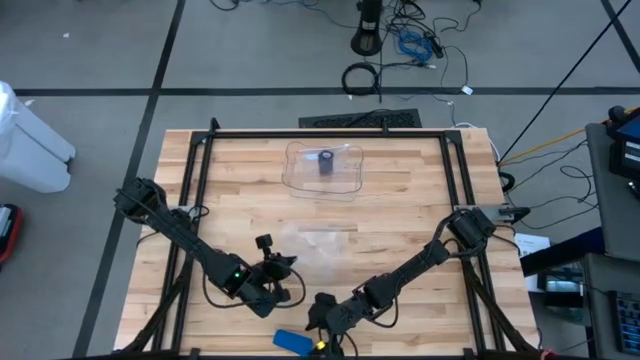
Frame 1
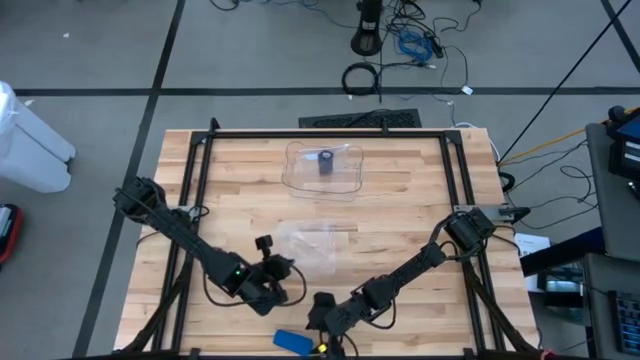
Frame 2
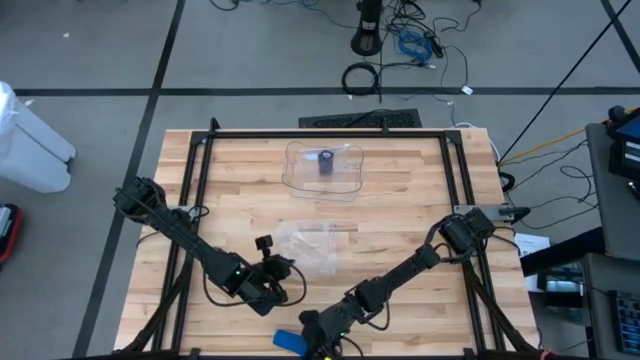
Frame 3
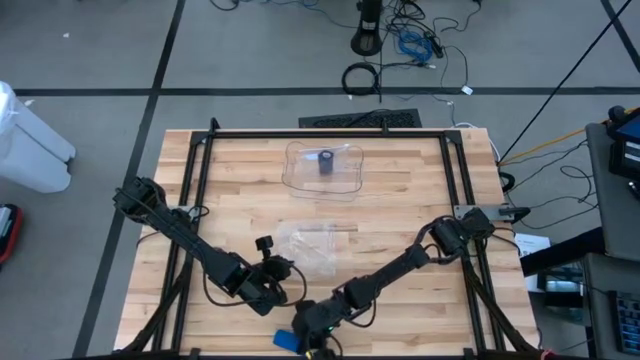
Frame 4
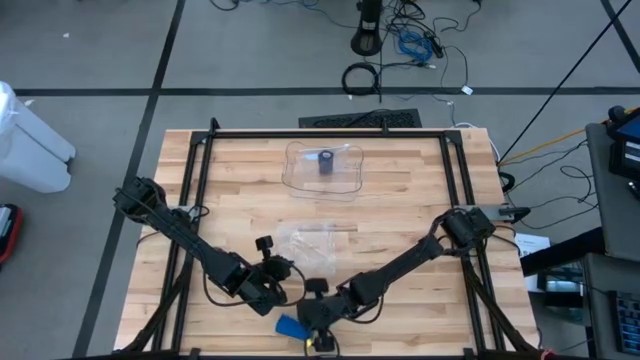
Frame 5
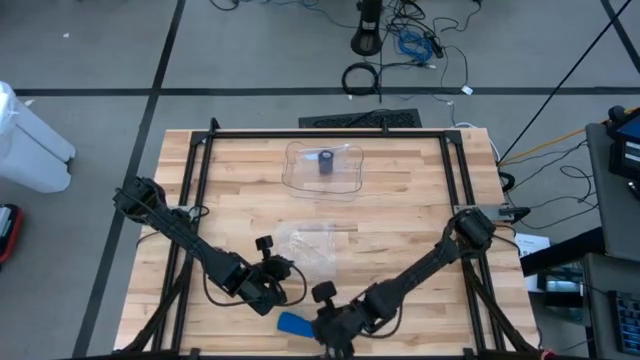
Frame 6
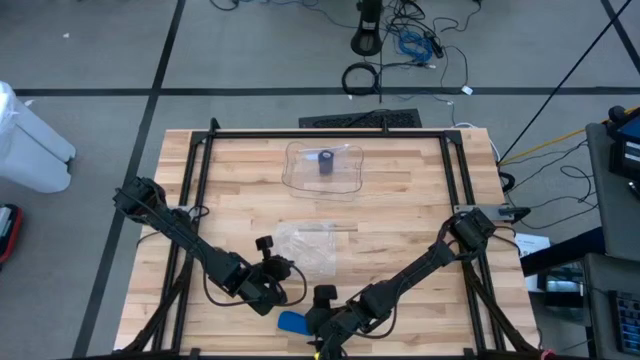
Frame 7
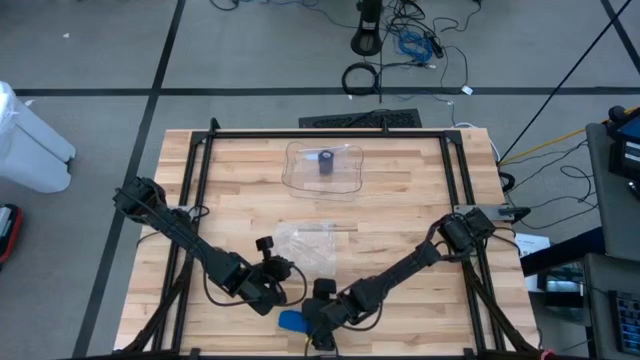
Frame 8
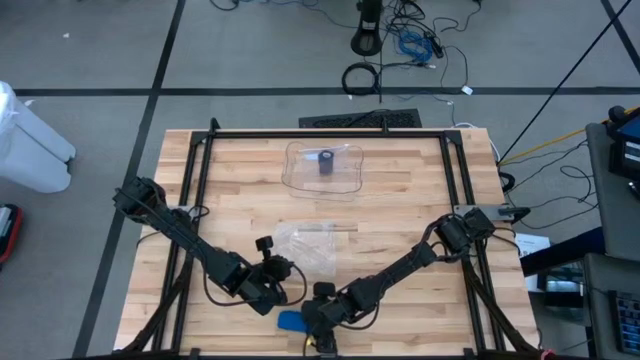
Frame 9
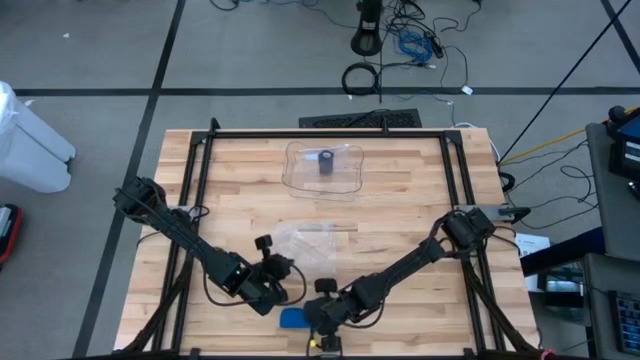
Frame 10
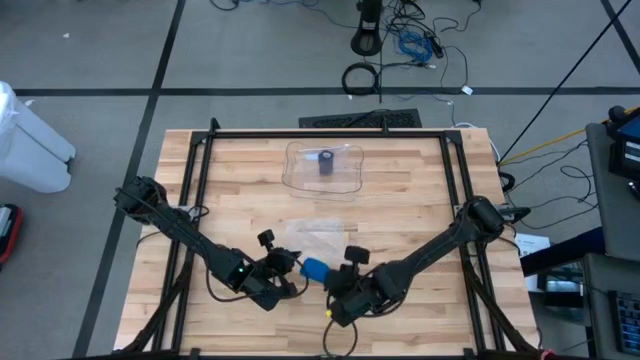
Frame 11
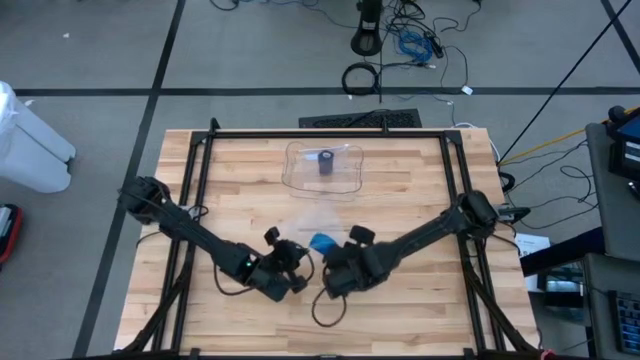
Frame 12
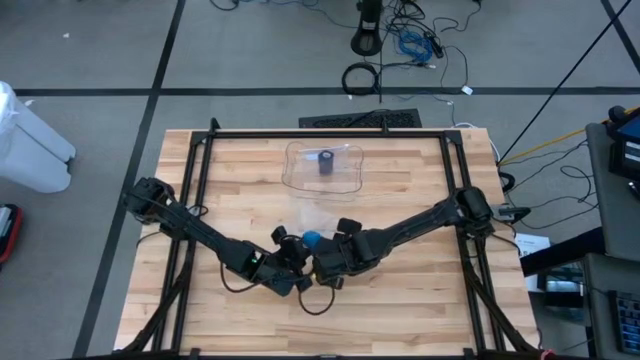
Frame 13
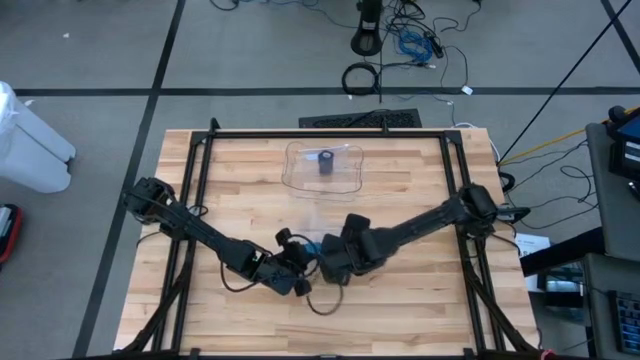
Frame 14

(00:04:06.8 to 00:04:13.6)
Task: Roll bandage
Put the rolled blue bandage into the transparent zip bag

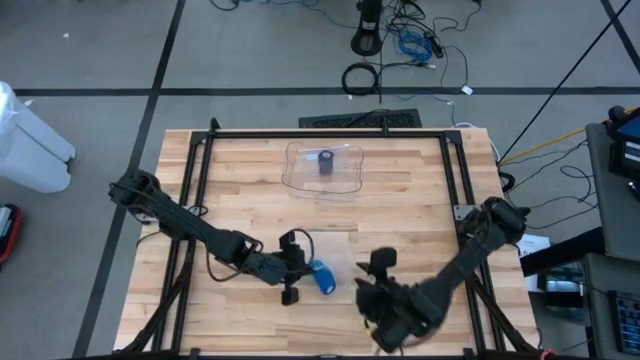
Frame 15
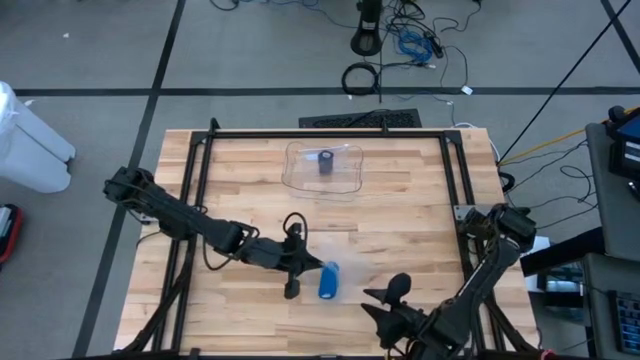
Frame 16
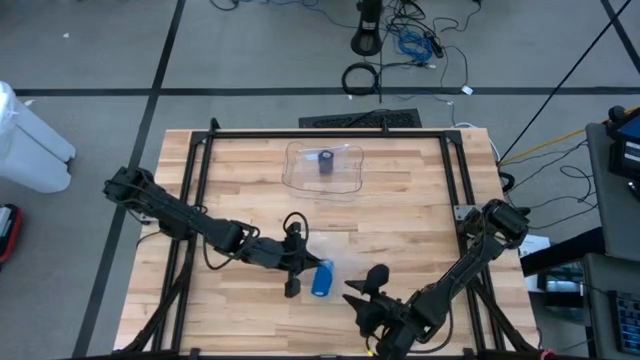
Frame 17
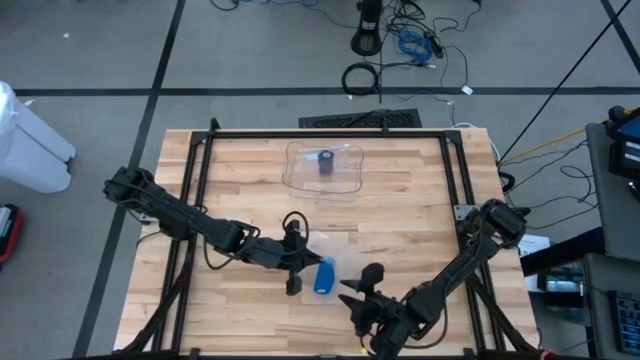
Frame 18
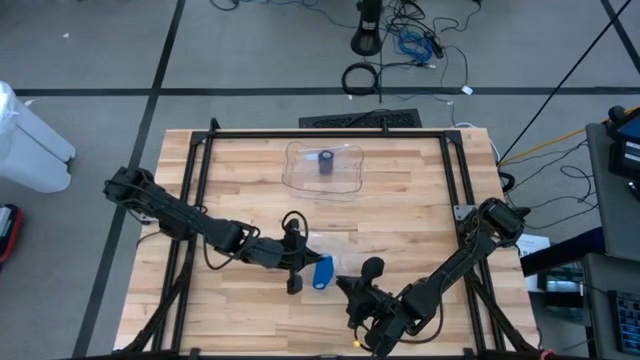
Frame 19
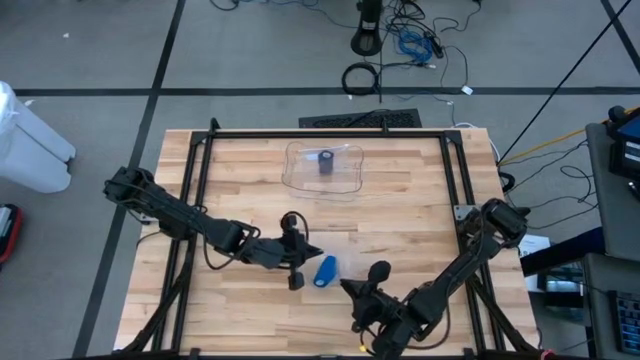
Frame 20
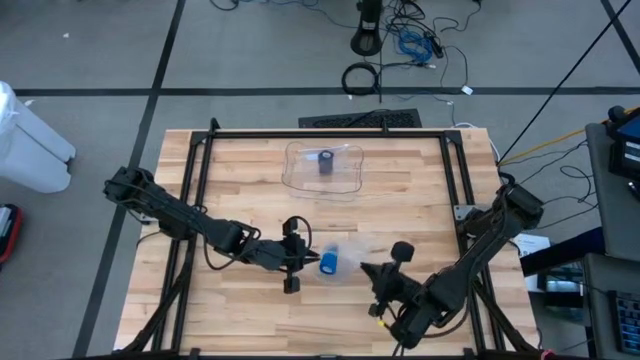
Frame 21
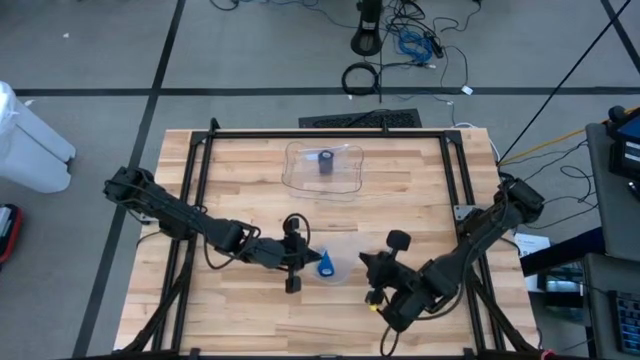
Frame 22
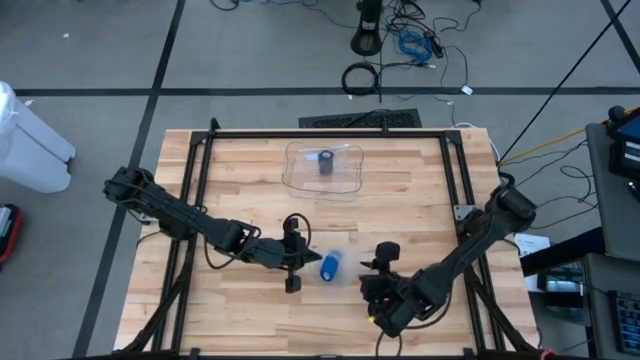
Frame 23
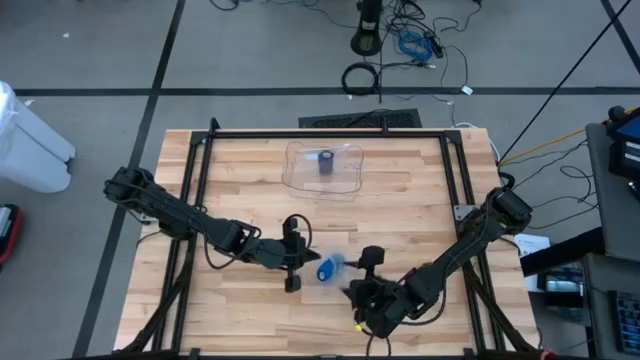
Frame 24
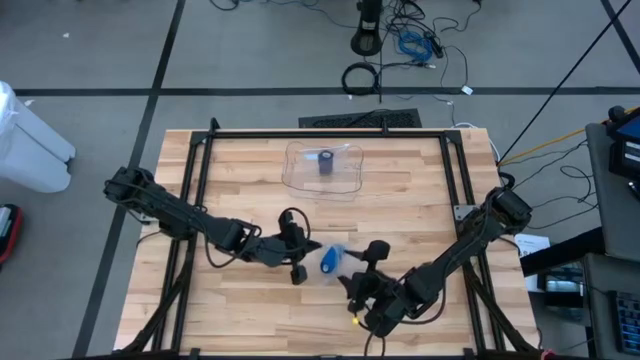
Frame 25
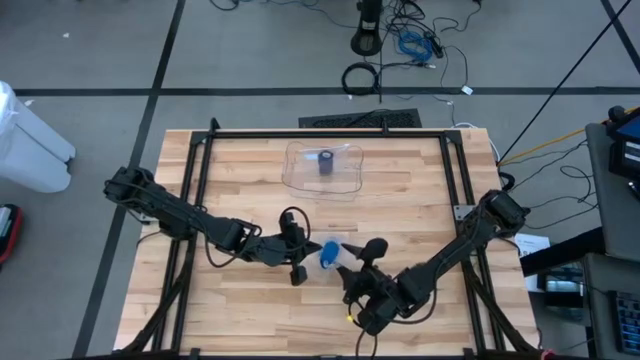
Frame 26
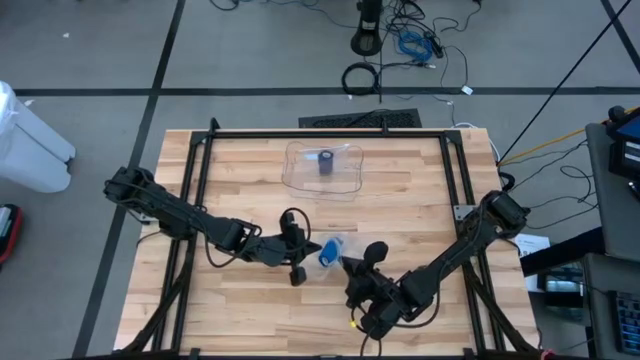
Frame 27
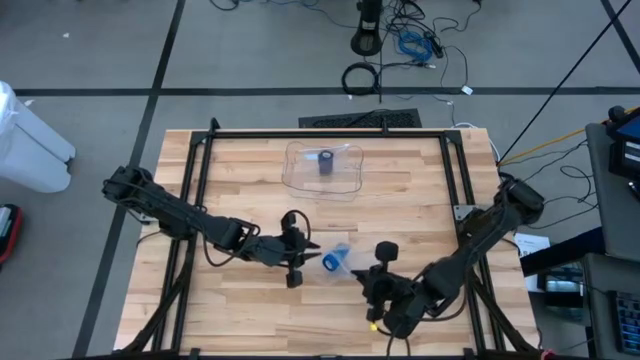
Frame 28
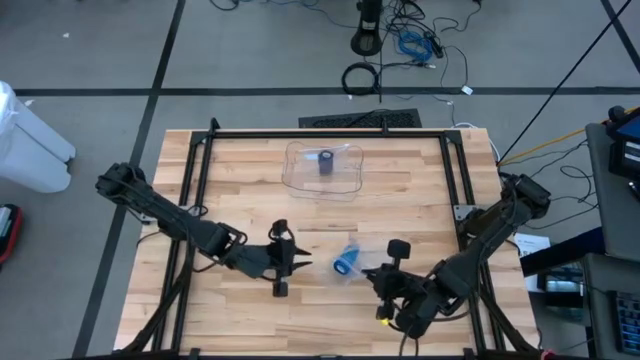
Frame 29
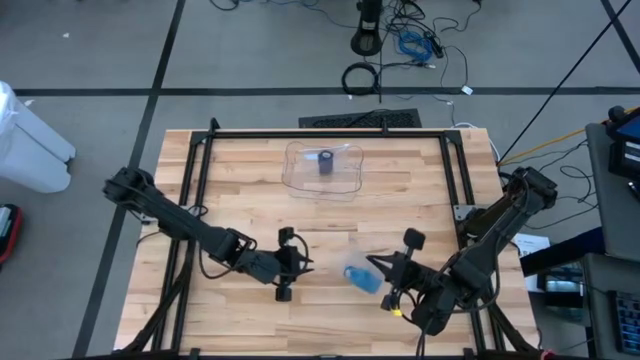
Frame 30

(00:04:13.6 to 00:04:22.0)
Close the transparent zip bag

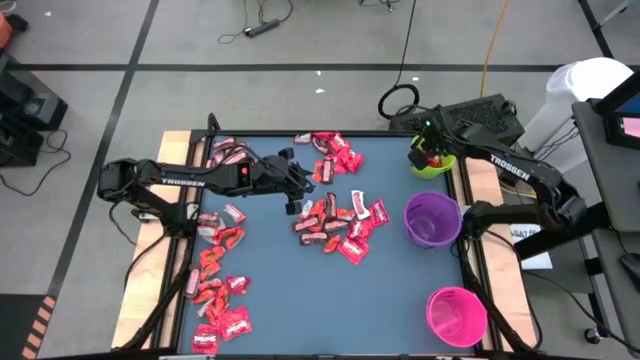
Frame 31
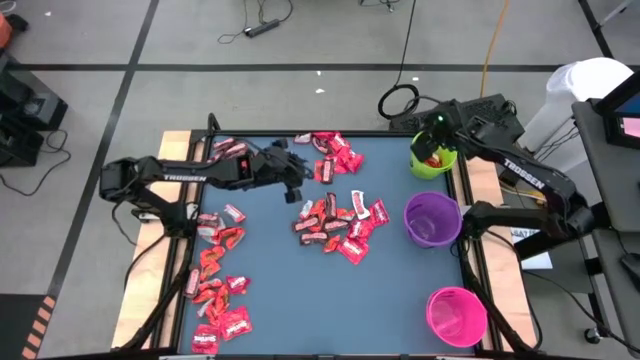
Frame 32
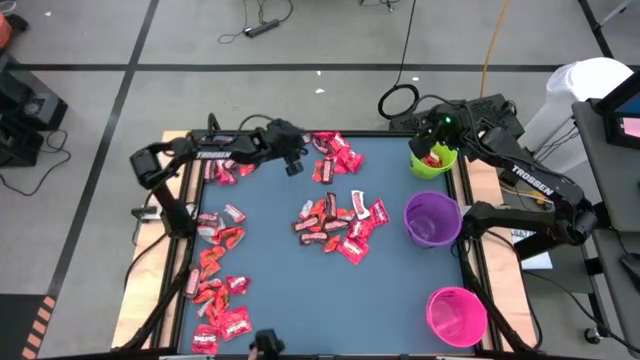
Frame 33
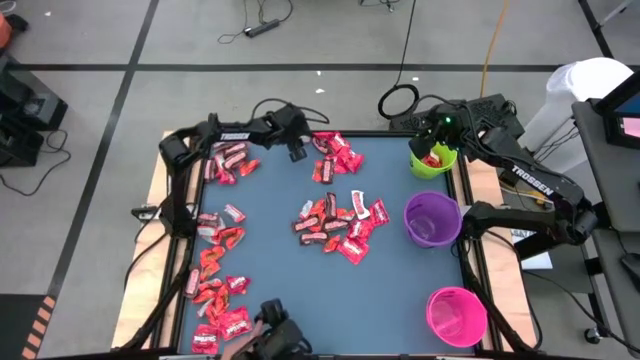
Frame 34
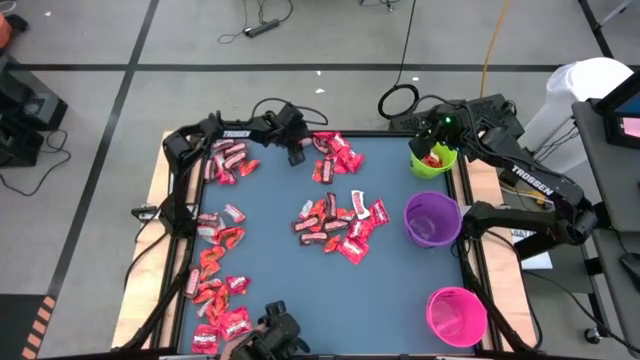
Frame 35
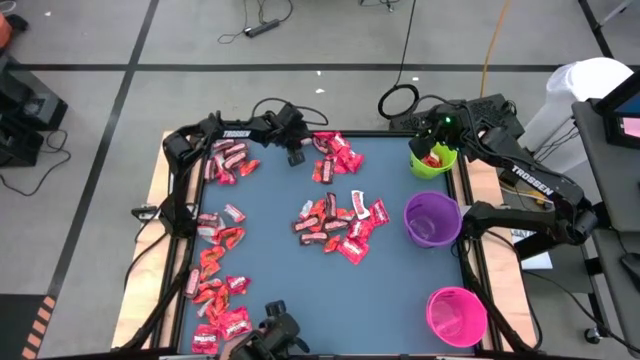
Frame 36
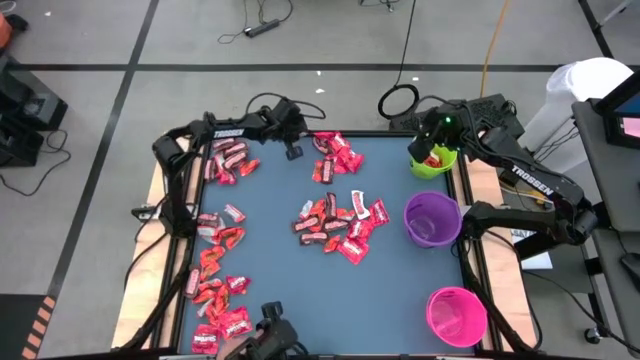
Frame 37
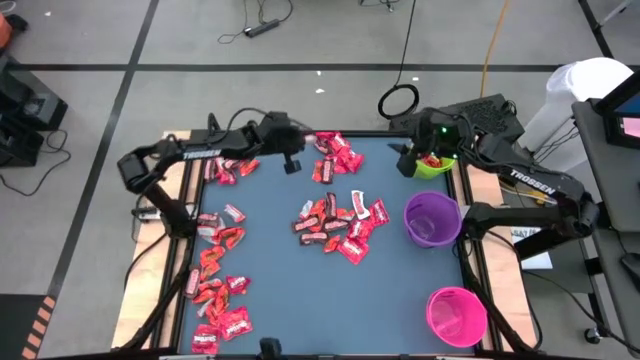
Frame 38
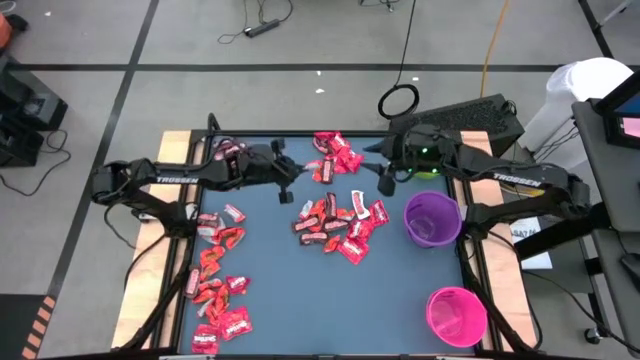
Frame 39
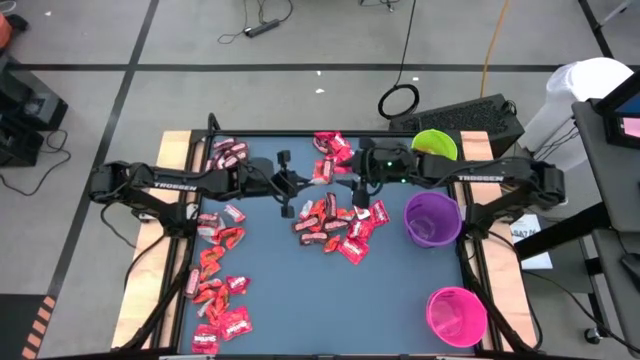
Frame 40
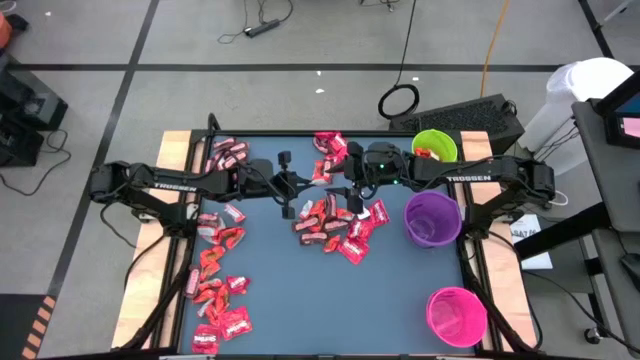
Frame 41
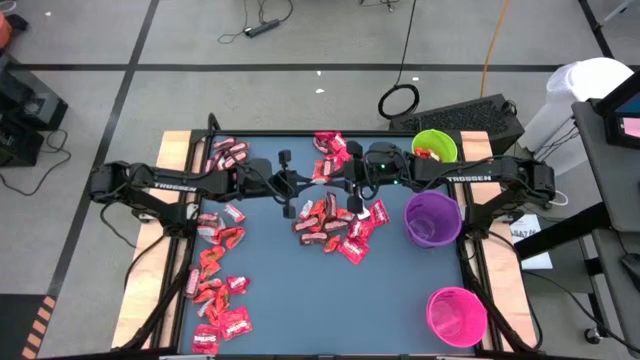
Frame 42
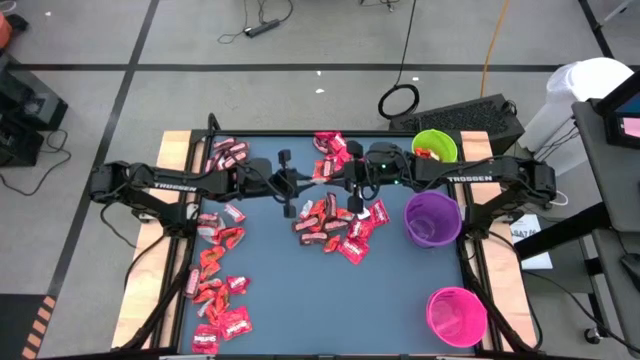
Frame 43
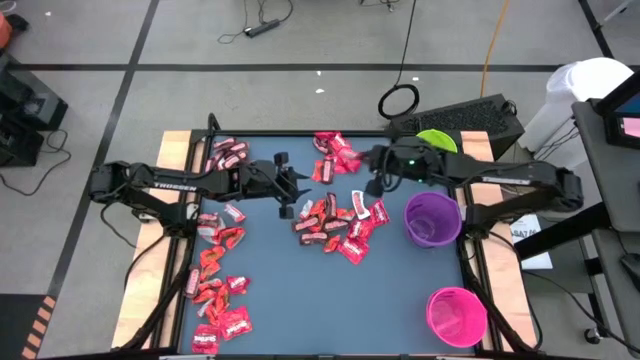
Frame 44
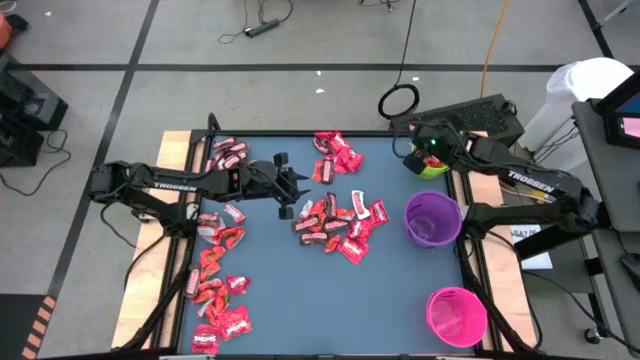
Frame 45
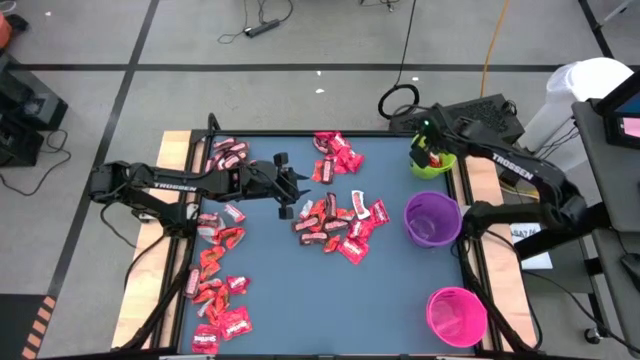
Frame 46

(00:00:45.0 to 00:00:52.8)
Task: Organize candy in baskets
Put the orange chocolate bar into the green bucket
